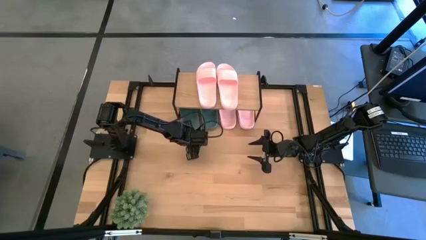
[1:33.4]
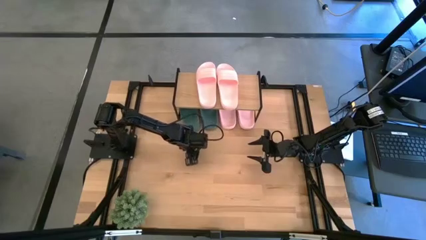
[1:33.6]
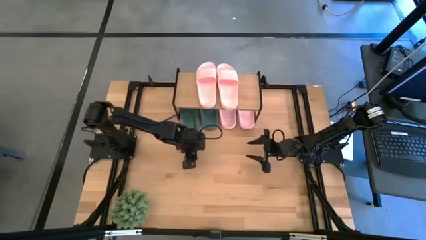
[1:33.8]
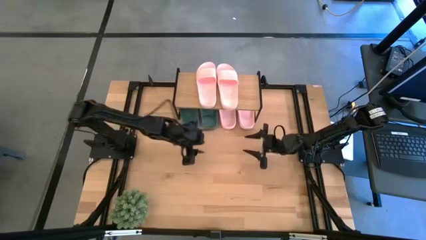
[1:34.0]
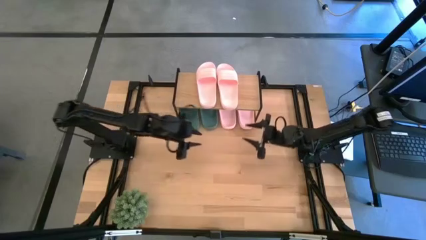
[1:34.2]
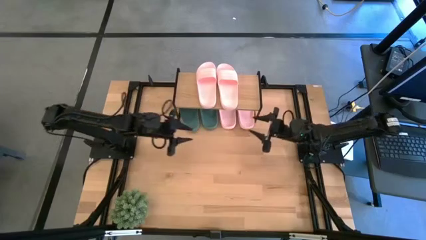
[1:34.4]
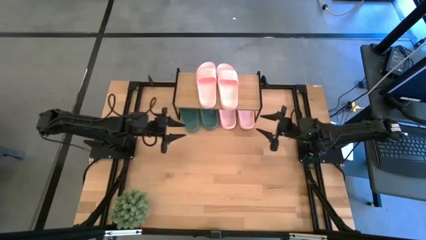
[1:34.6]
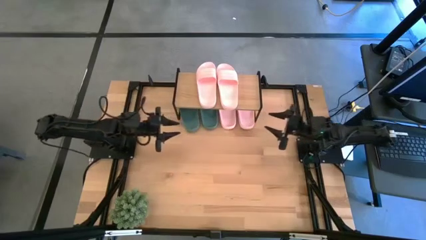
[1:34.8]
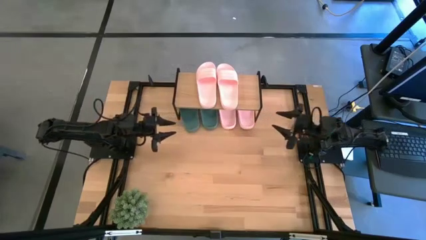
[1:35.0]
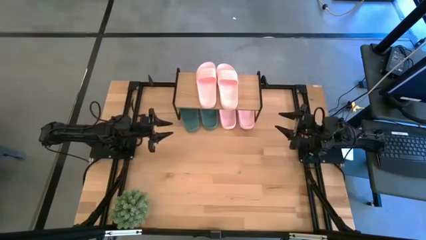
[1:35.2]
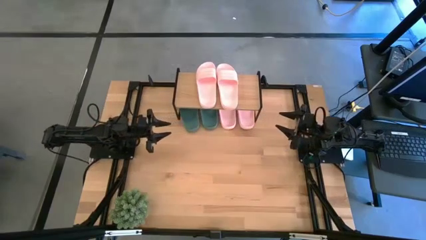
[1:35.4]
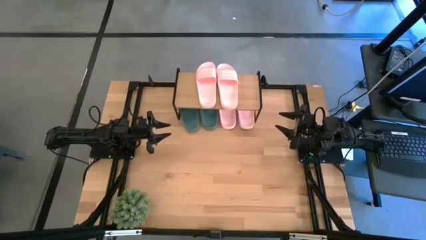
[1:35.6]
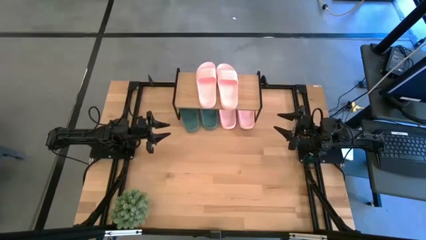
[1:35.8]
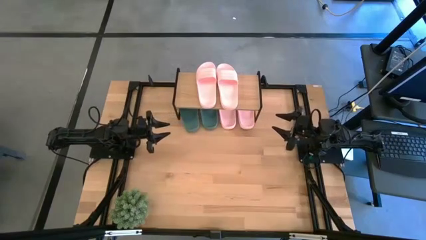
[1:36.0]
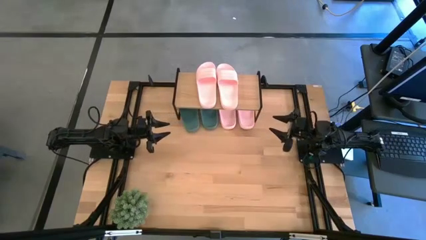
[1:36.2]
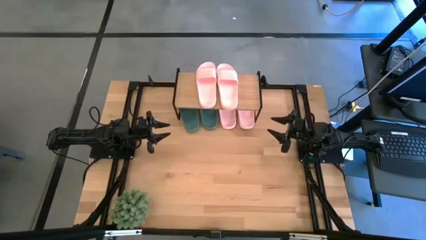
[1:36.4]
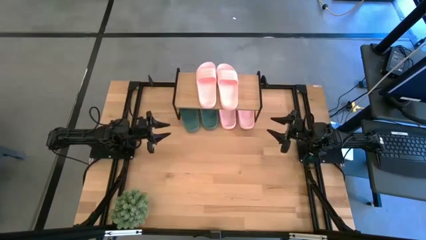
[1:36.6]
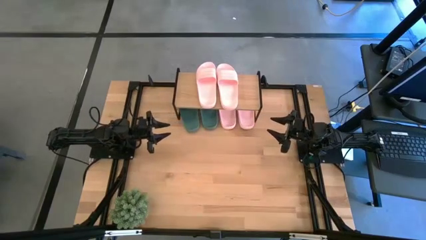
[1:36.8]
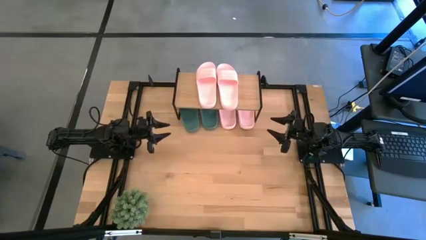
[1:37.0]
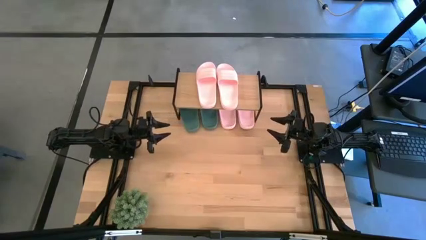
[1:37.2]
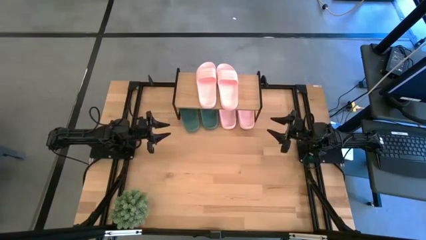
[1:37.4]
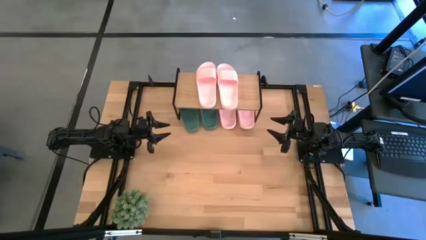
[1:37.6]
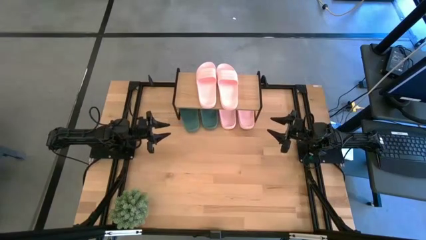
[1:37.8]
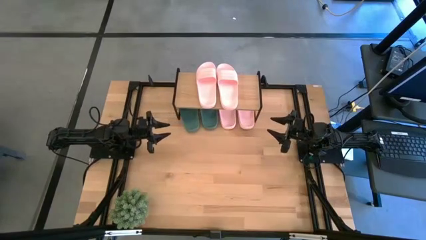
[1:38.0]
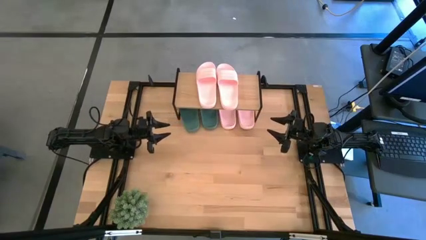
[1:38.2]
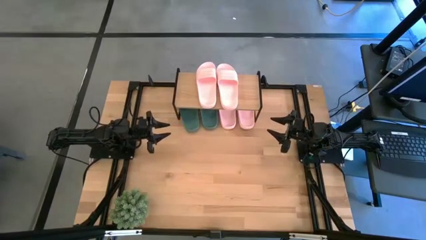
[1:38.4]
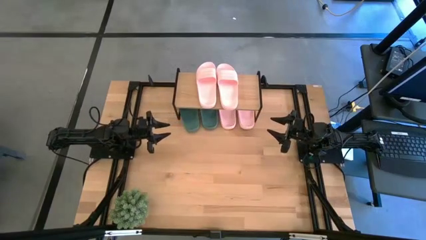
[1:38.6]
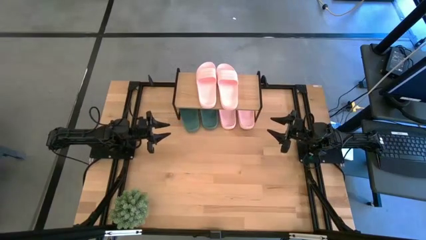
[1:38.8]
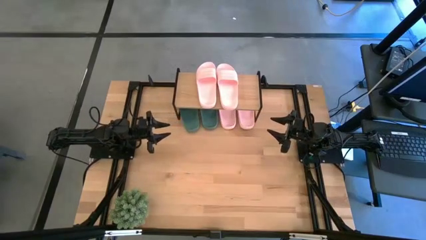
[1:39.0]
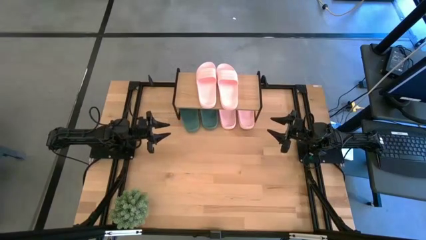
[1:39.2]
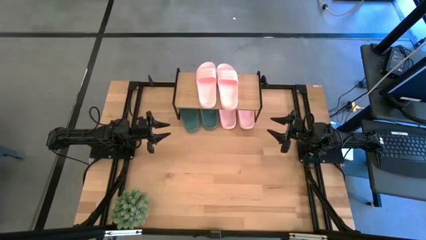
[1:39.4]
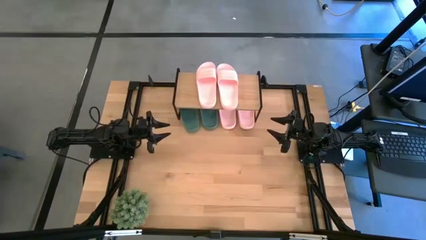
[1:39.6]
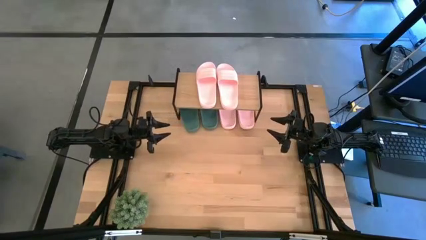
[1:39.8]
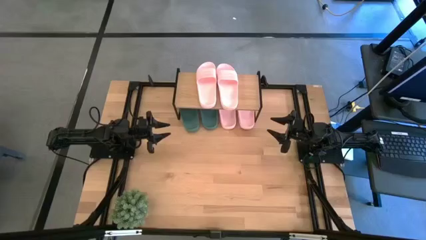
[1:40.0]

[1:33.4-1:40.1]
Task: Pick and place slides into the shelf
Return to Home Position

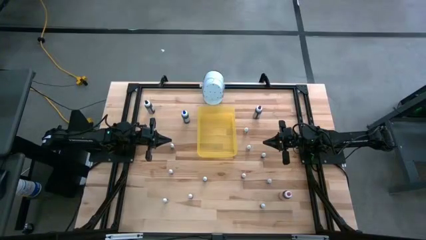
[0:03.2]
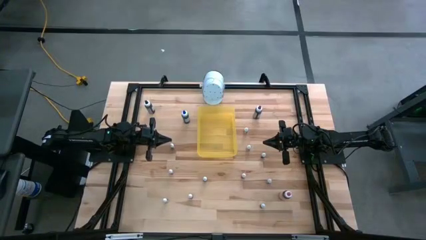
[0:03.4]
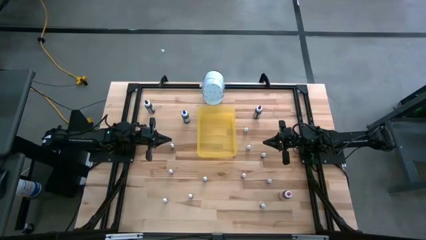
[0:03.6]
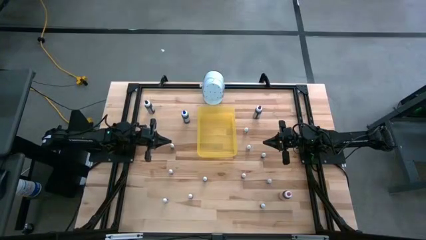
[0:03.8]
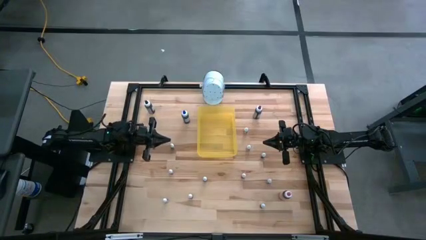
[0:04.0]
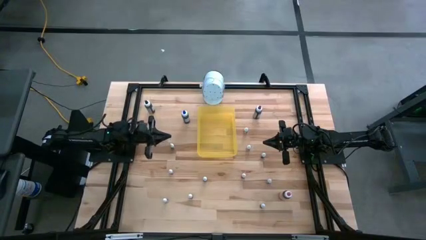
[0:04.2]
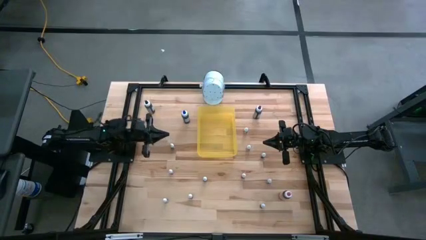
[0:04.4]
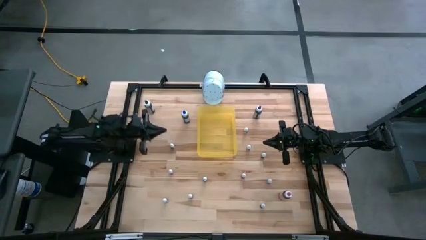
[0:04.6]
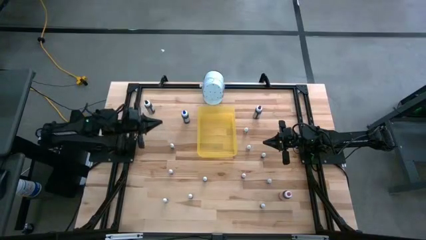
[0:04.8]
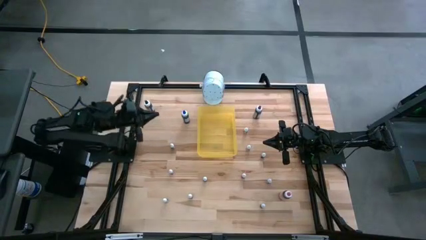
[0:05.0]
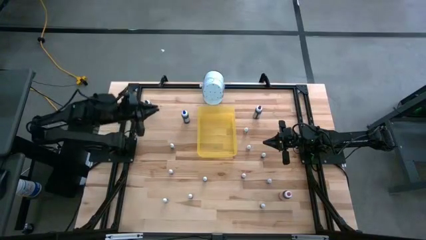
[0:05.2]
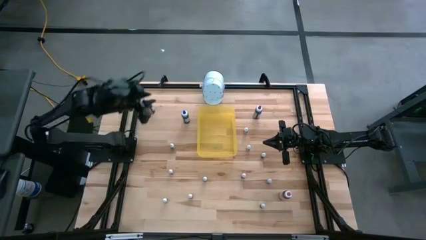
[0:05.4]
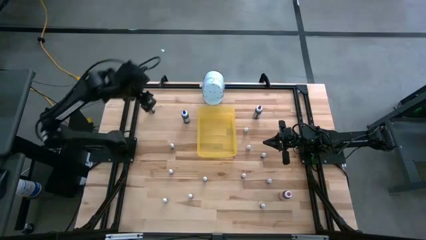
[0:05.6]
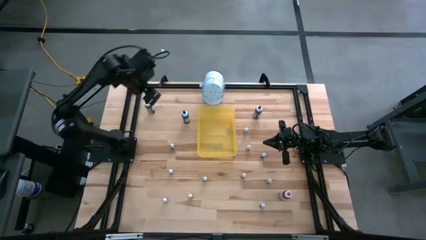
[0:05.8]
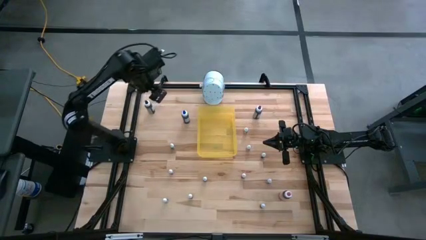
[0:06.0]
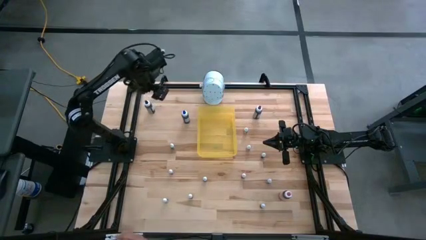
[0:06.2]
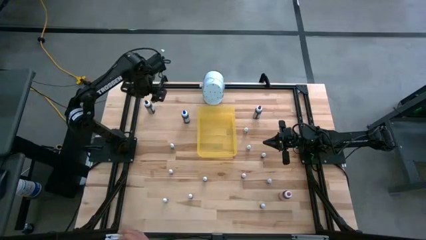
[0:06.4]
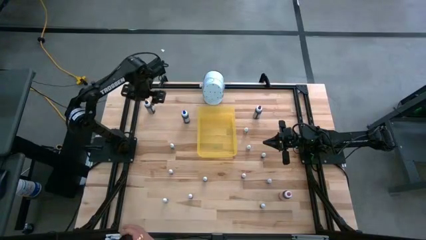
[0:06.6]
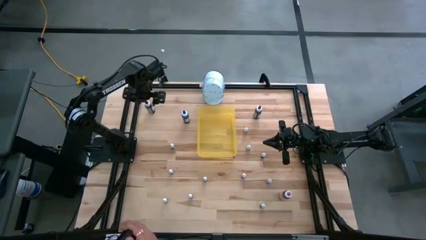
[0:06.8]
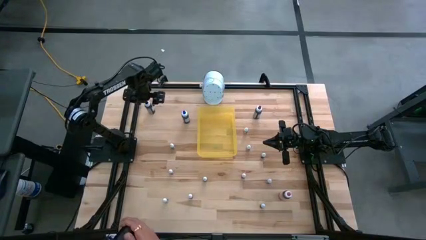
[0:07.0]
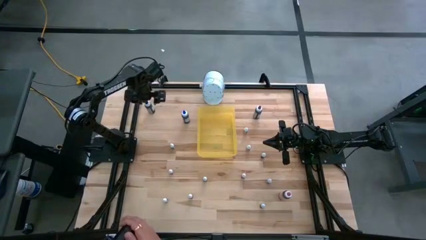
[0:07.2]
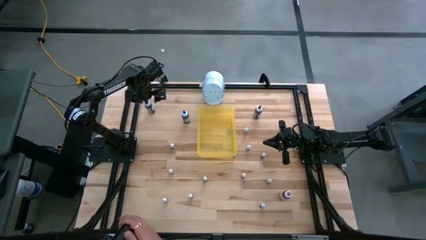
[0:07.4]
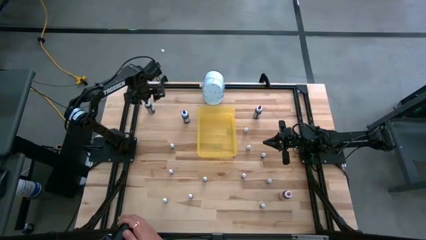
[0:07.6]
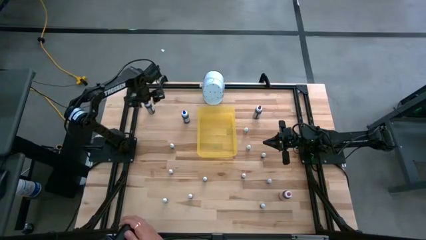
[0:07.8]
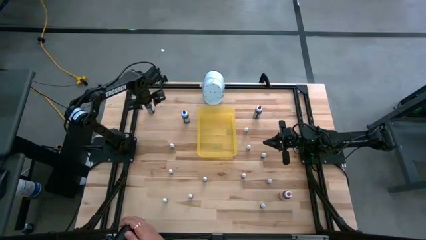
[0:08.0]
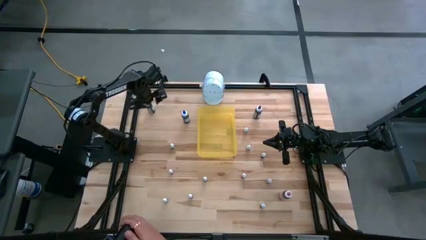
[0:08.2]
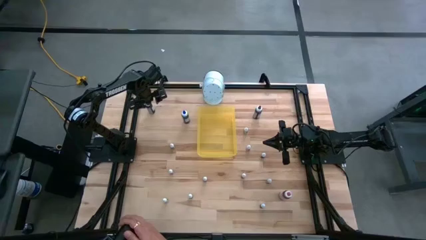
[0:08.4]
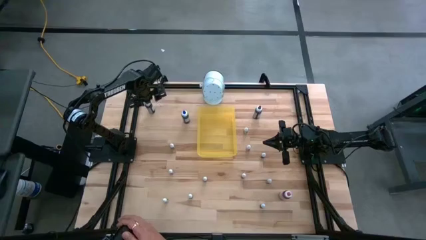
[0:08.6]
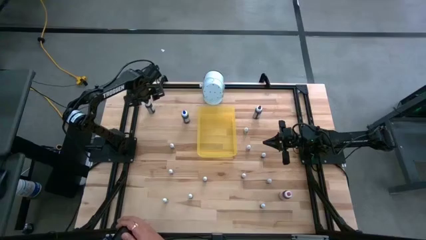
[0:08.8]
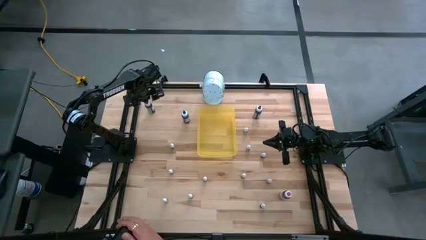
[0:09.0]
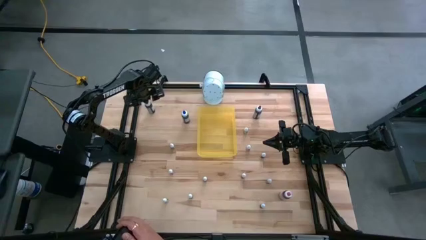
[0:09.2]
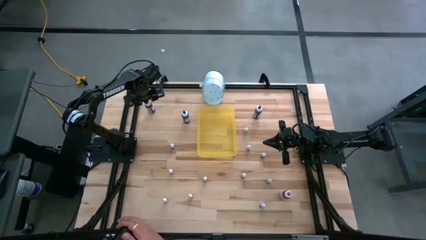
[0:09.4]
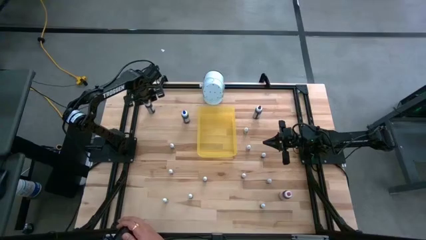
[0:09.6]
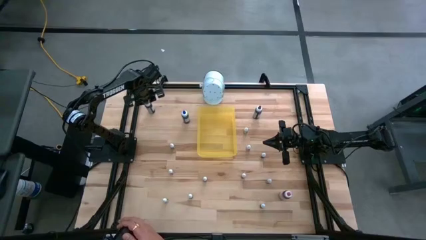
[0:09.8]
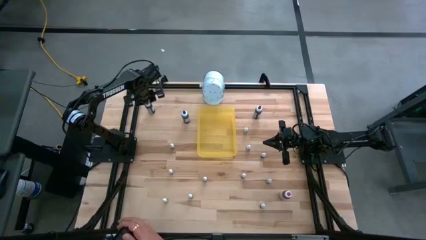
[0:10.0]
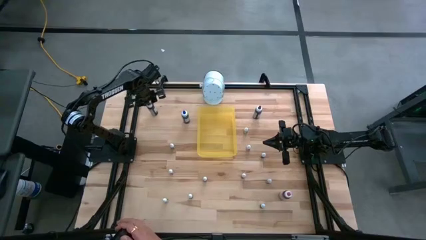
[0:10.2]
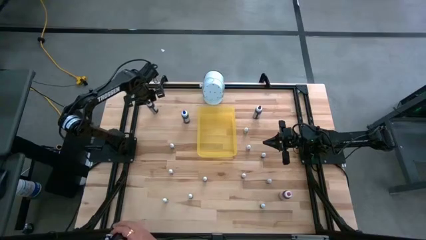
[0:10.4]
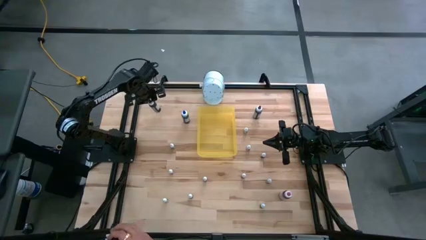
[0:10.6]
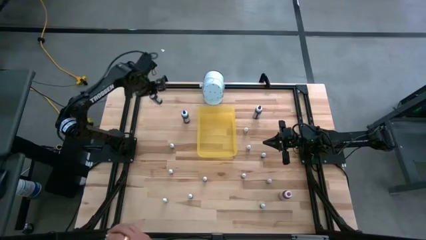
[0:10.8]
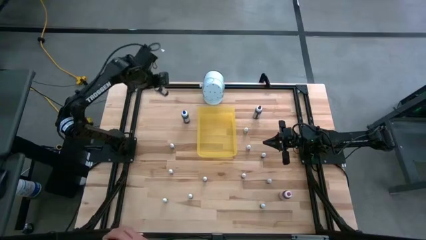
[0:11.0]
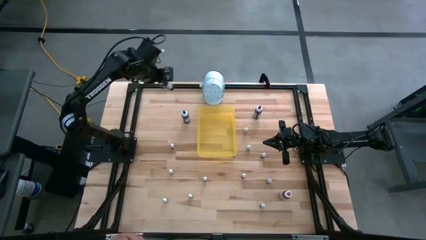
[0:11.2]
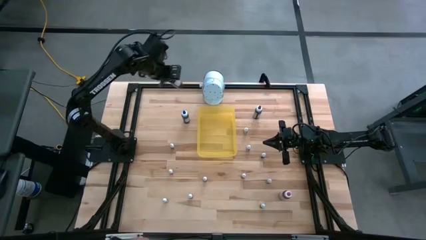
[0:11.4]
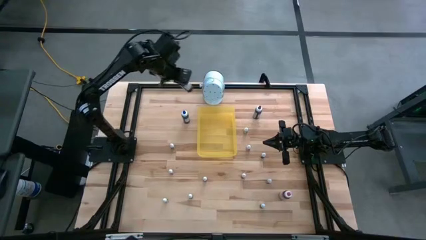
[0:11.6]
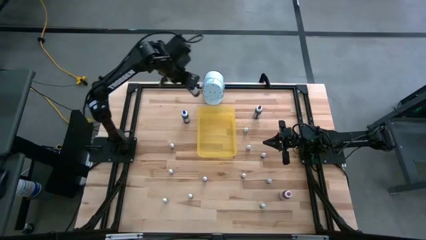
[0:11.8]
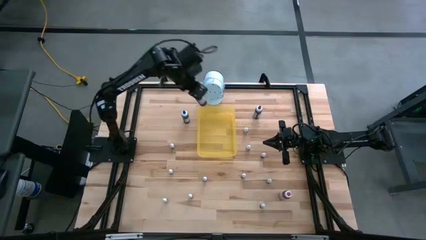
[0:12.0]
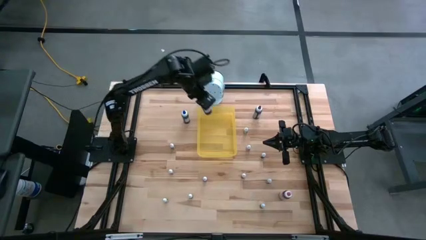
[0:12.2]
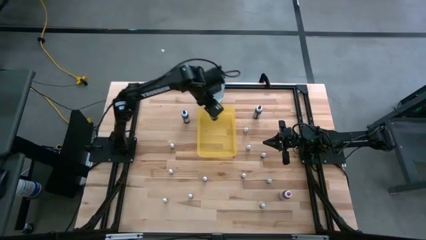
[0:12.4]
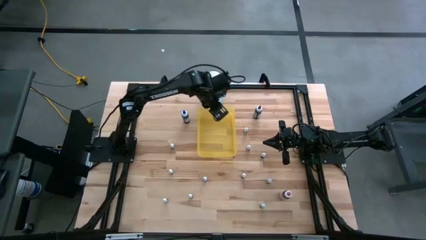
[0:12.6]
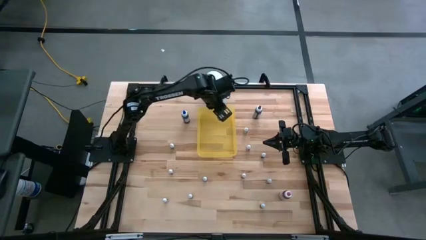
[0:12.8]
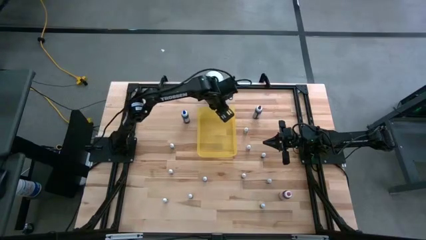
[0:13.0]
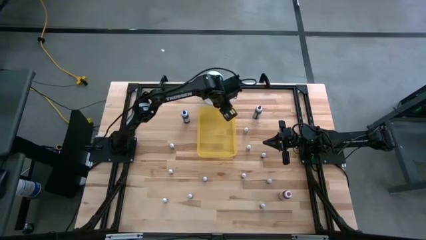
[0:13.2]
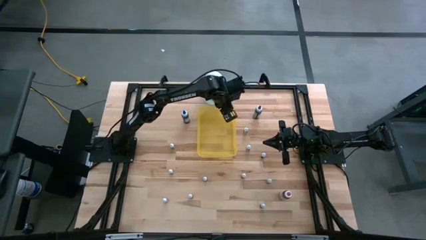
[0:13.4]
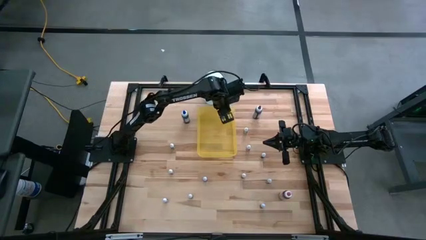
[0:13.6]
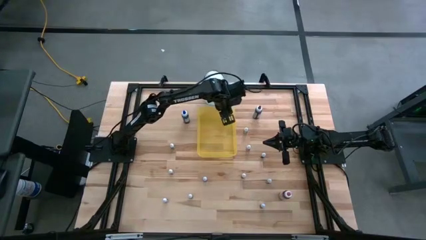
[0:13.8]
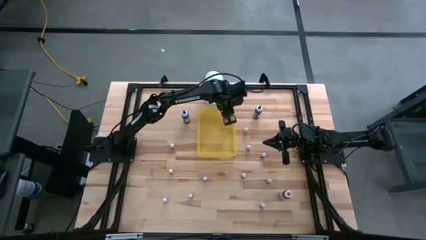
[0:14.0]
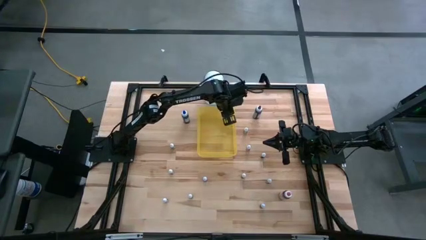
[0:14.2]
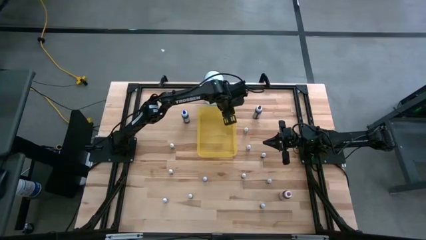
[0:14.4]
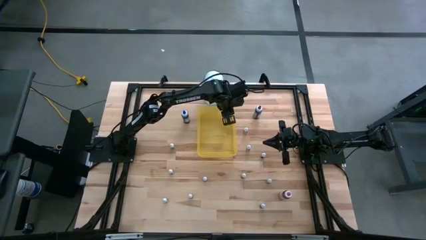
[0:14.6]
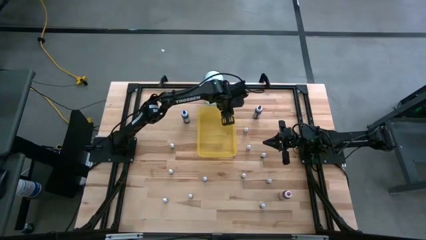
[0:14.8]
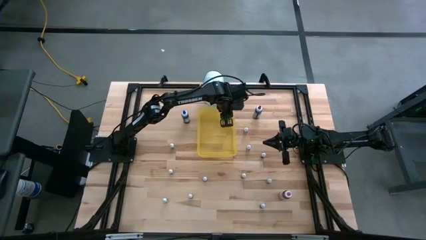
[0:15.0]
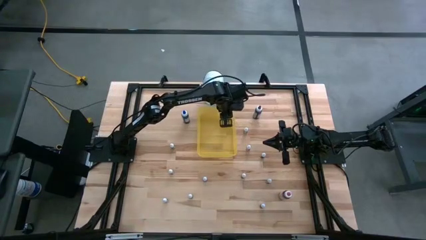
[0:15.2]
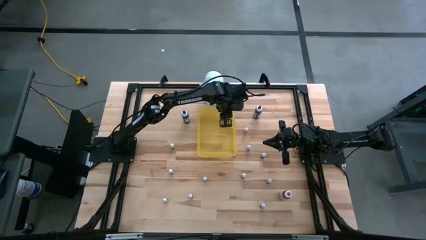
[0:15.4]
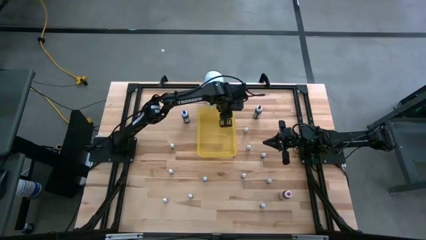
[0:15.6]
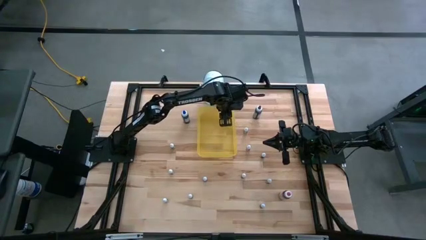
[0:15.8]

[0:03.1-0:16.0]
Task: Pick & Place food coloring
Put the big black food coloring bottle in the yellow transparent bin
